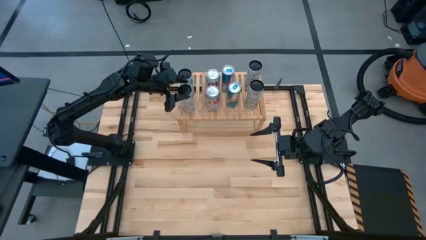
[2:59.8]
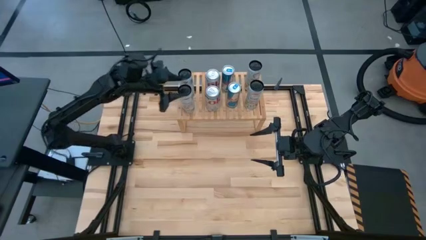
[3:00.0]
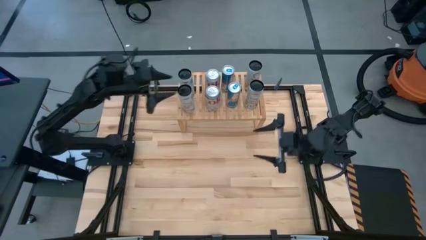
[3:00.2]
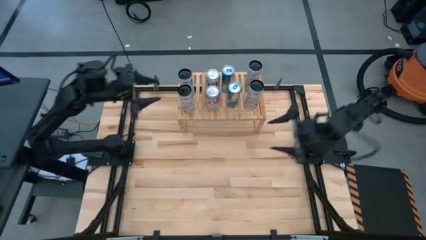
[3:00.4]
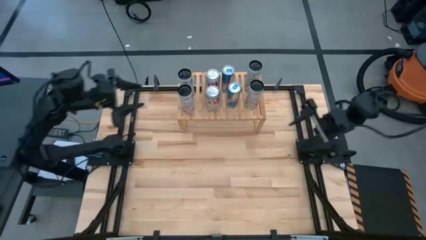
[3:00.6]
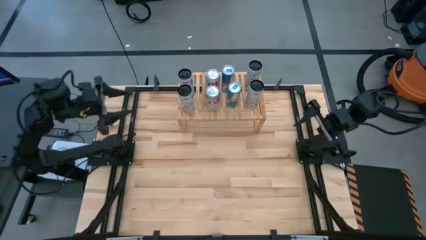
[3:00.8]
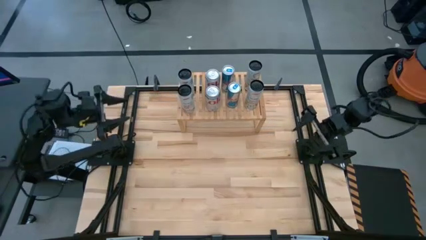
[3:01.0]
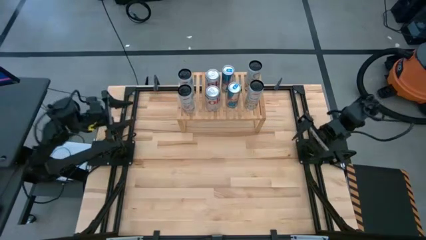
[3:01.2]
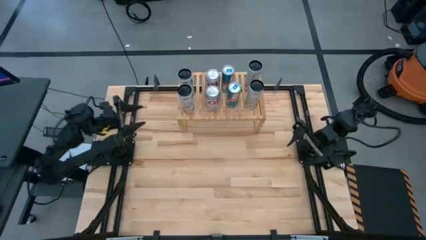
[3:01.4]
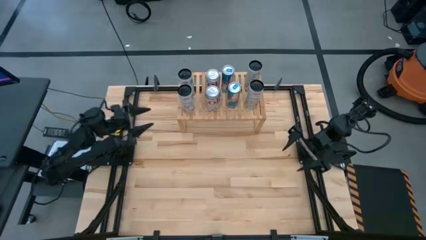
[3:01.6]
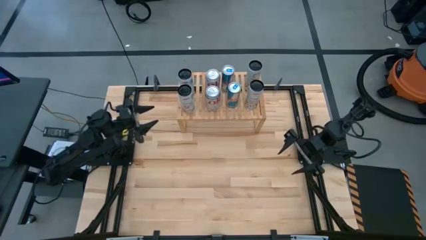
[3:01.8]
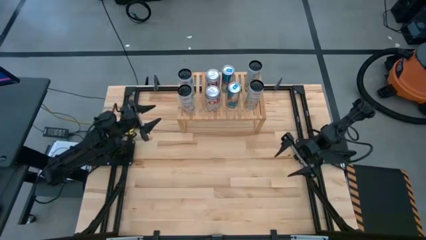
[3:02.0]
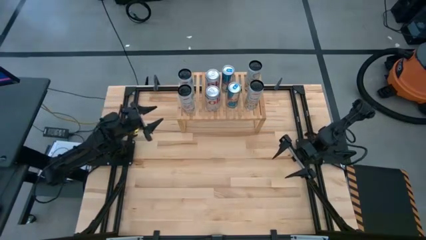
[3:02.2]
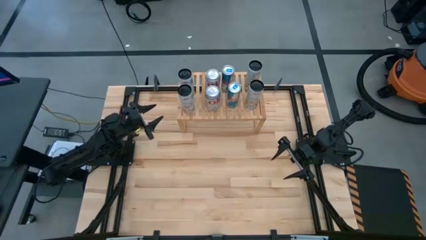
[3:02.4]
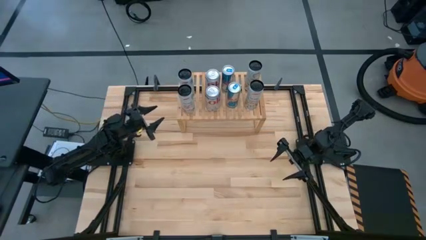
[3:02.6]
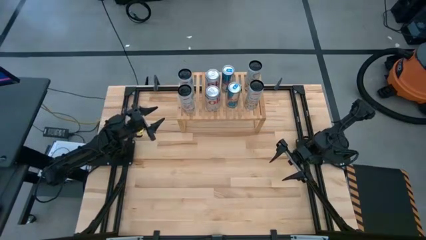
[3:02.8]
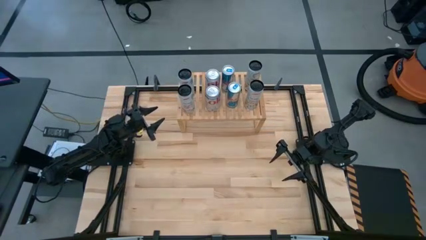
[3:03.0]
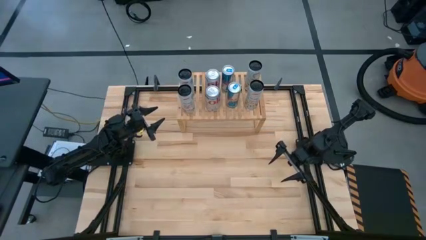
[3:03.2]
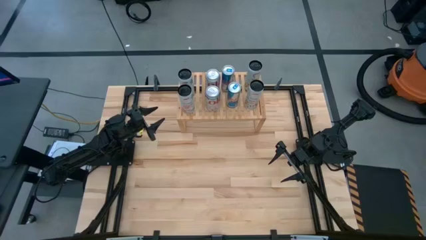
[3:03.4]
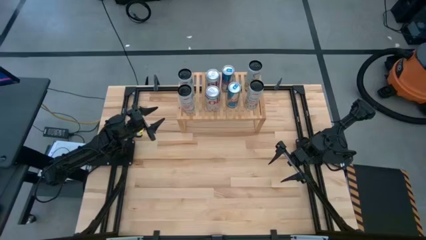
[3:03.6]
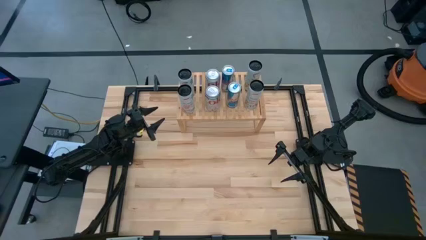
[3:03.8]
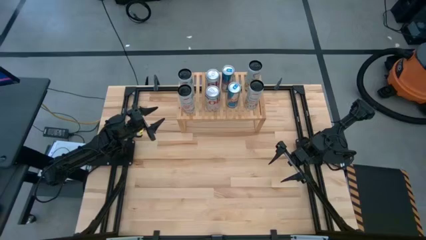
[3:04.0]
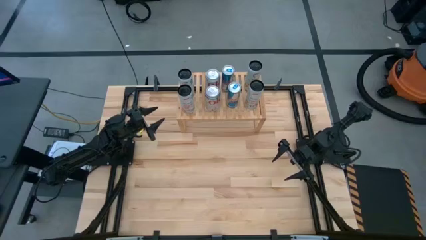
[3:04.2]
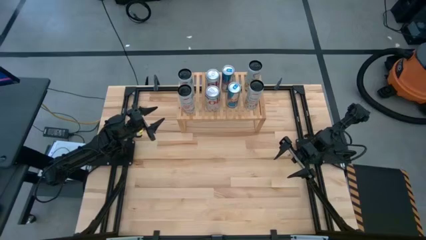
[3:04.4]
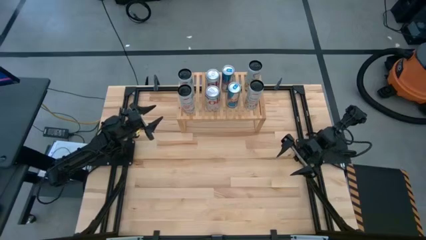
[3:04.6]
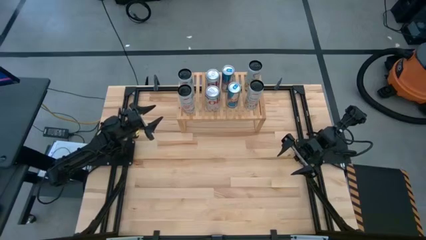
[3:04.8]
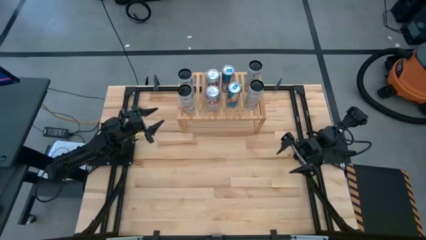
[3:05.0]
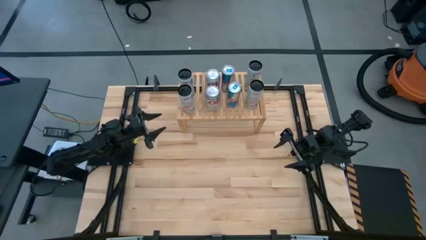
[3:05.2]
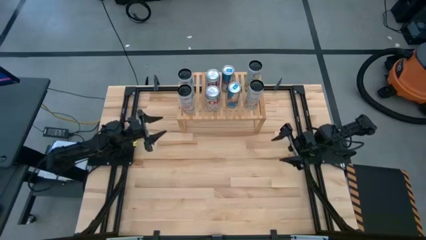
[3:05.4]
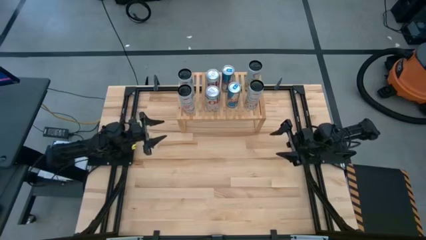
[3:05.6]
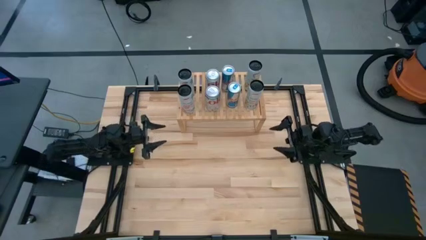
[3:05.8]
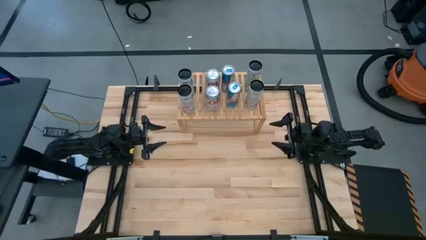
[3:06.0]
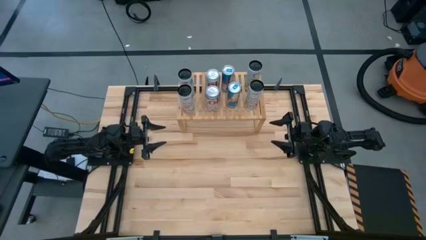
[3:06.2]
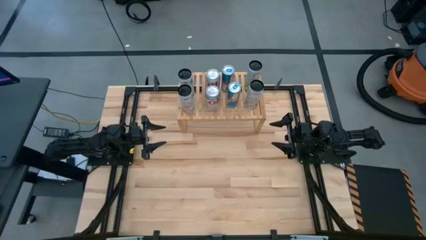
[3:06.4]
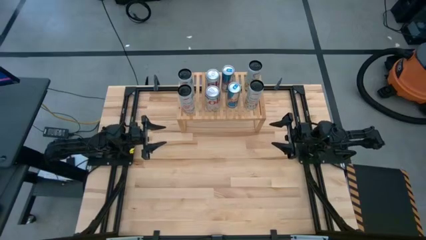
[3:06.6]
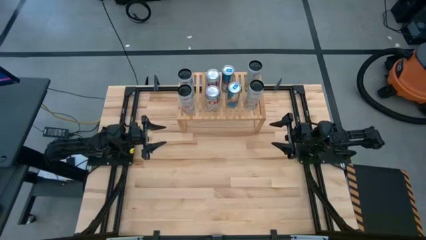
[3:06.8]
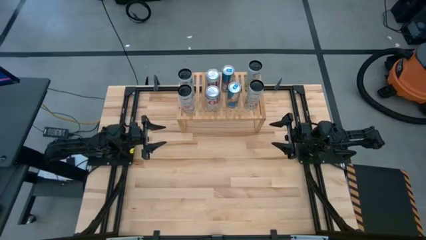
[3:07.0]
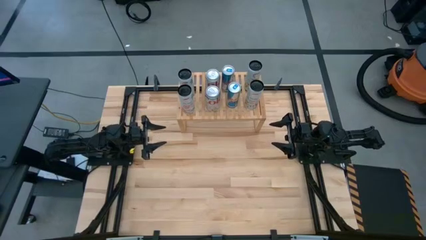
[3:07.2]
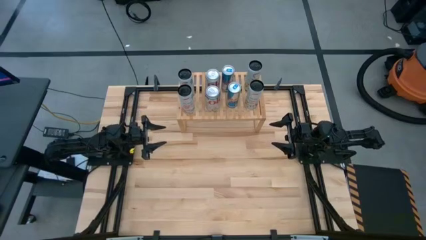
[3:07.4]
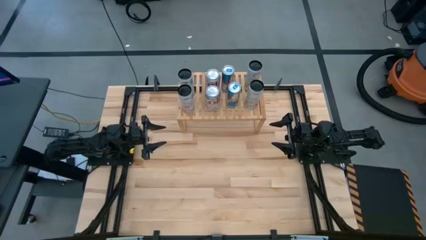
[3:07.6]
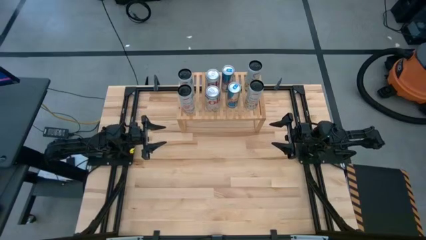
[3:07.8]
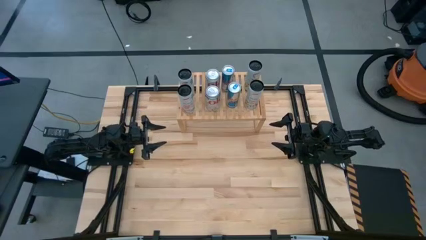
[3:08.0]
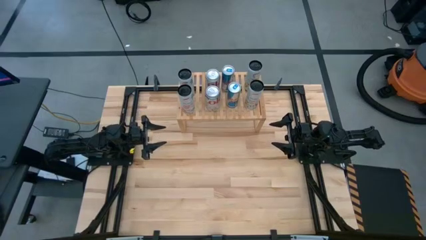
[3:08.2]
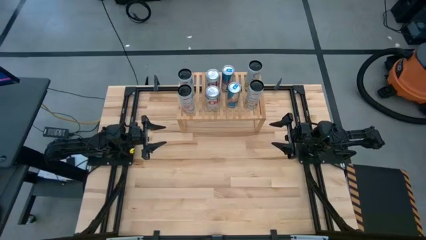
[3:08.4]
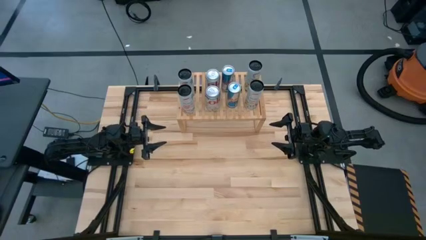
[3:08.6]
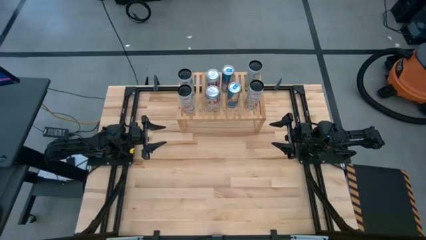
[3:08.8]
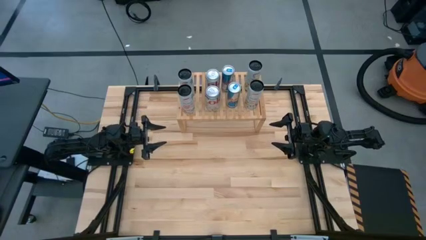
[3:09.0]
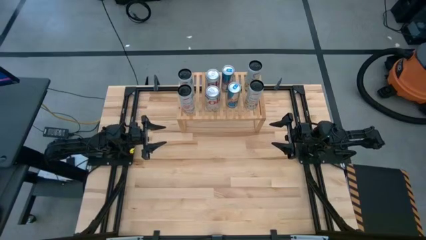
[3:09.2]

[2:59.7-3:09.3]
Task: Place canned beverage on shelf
Return to Home Position

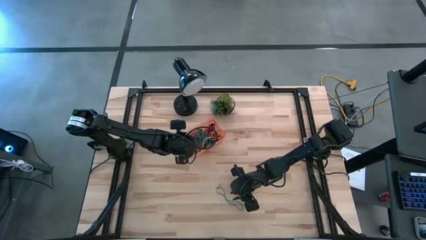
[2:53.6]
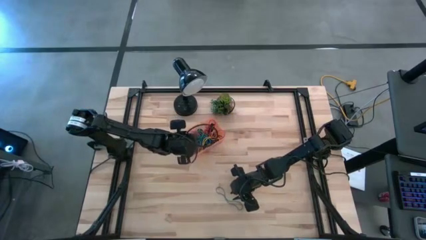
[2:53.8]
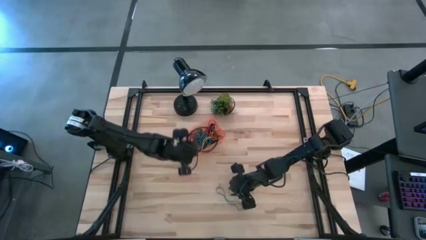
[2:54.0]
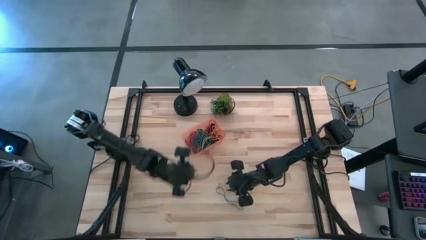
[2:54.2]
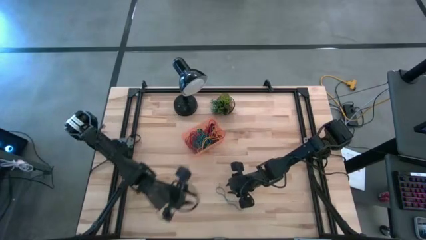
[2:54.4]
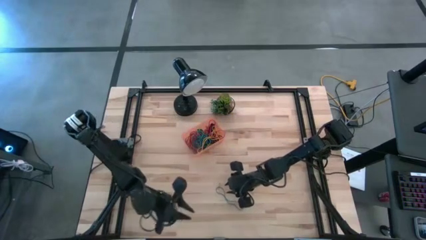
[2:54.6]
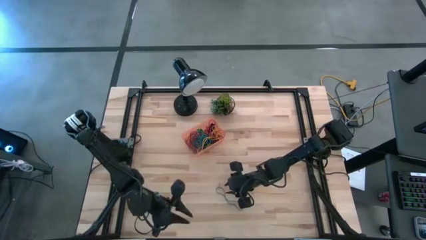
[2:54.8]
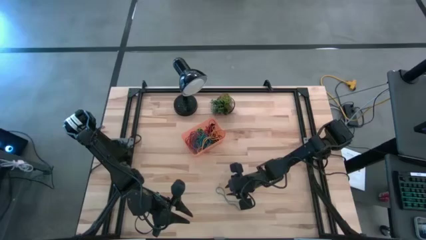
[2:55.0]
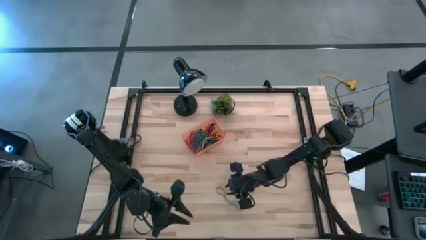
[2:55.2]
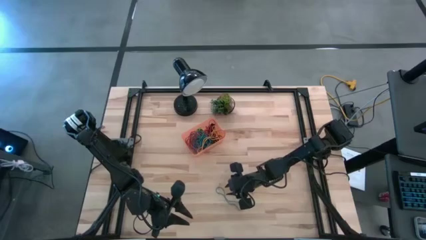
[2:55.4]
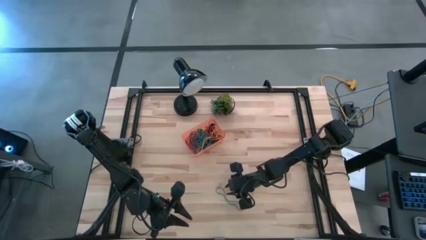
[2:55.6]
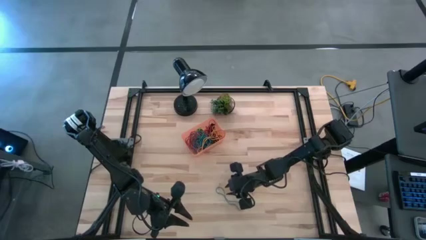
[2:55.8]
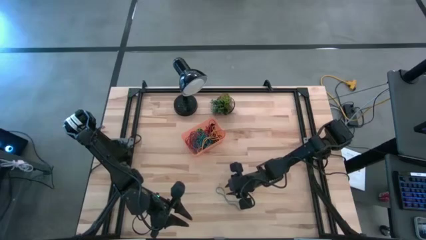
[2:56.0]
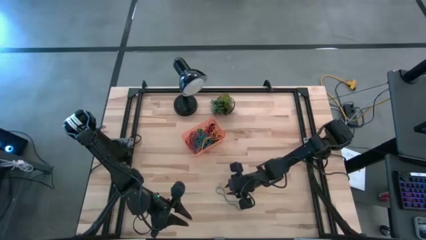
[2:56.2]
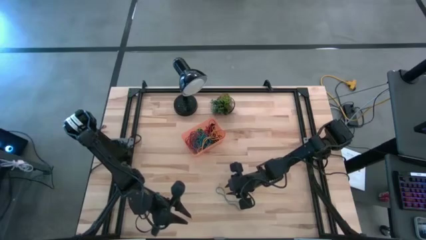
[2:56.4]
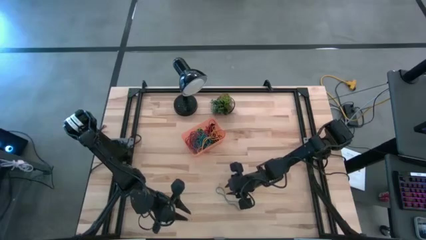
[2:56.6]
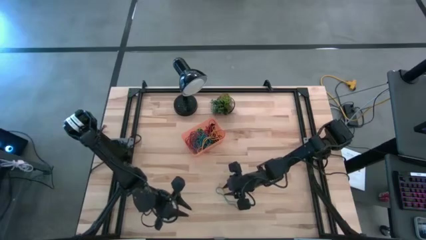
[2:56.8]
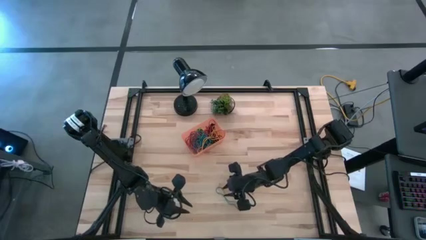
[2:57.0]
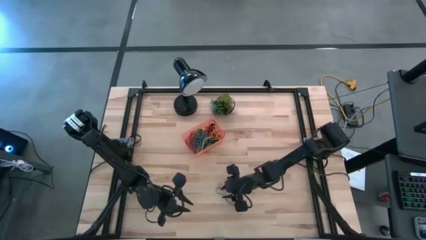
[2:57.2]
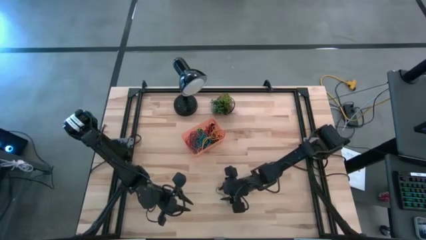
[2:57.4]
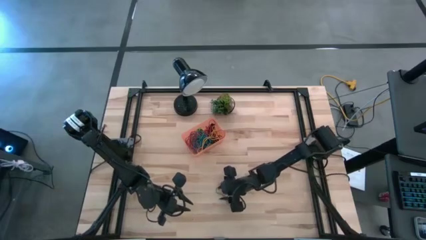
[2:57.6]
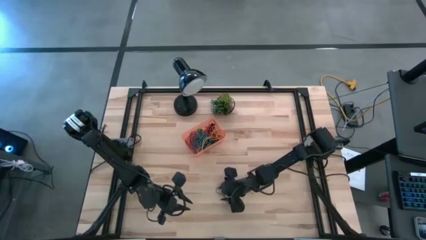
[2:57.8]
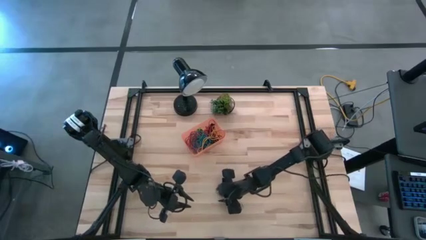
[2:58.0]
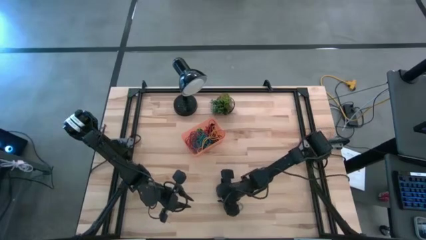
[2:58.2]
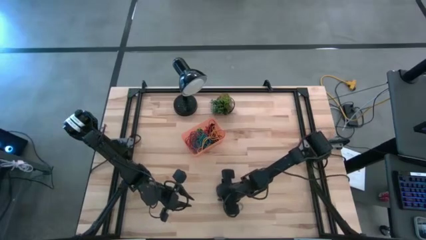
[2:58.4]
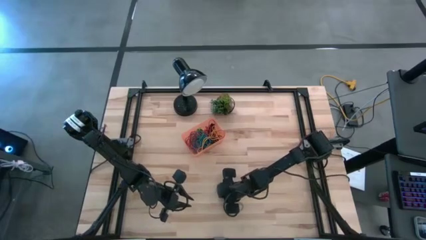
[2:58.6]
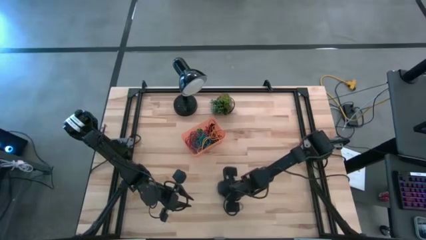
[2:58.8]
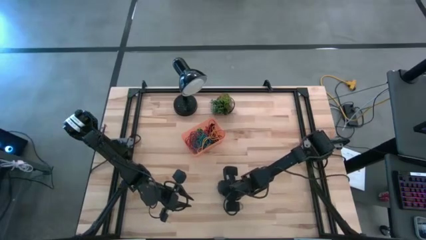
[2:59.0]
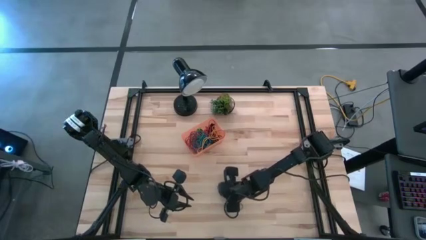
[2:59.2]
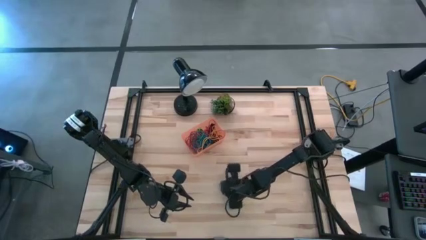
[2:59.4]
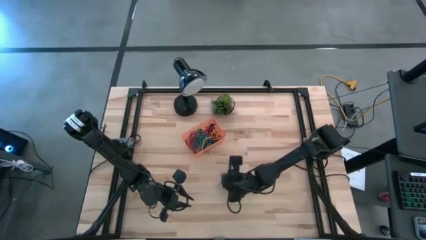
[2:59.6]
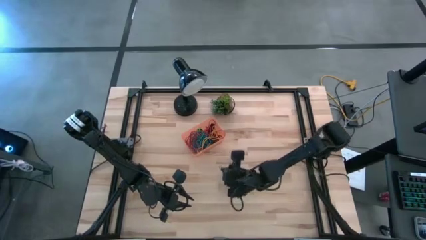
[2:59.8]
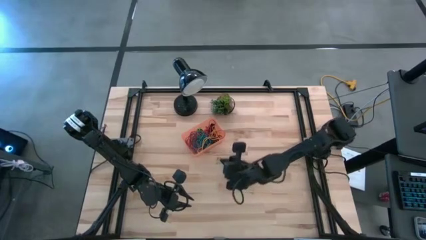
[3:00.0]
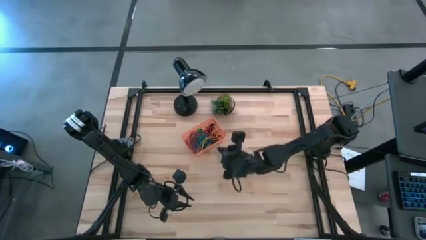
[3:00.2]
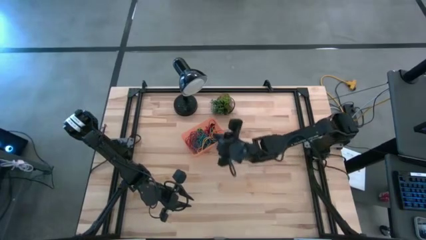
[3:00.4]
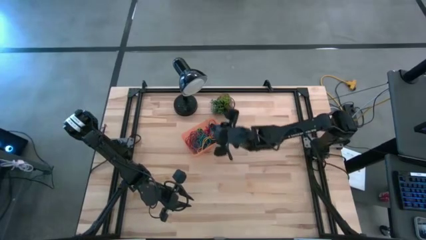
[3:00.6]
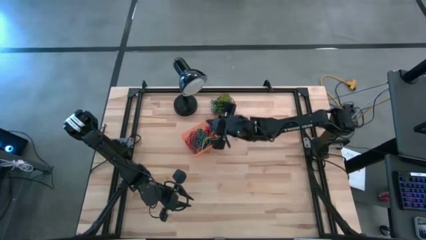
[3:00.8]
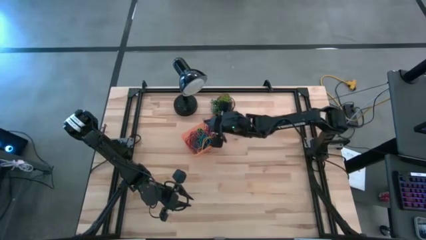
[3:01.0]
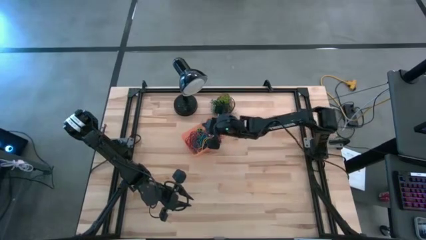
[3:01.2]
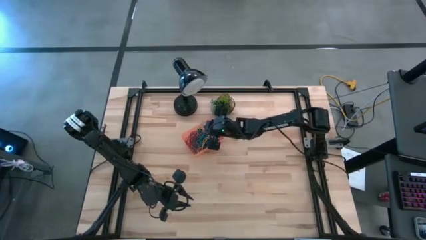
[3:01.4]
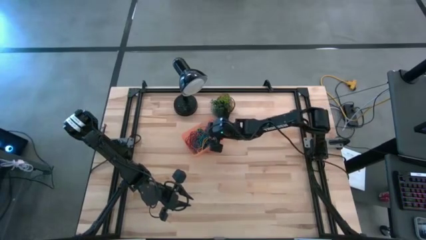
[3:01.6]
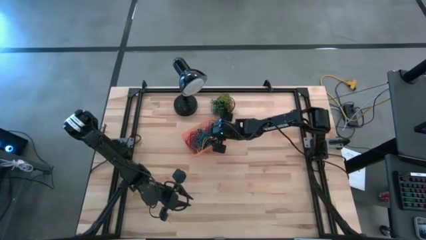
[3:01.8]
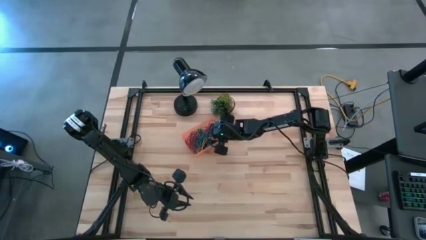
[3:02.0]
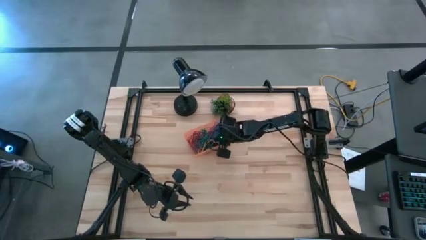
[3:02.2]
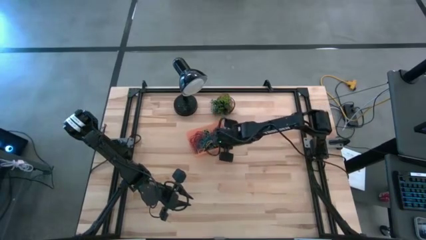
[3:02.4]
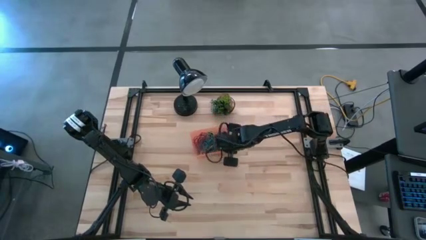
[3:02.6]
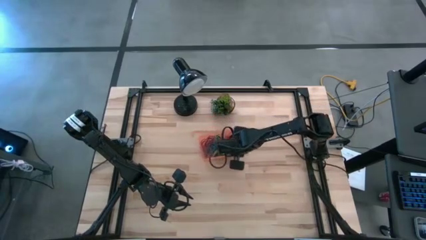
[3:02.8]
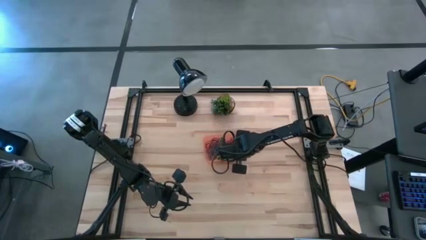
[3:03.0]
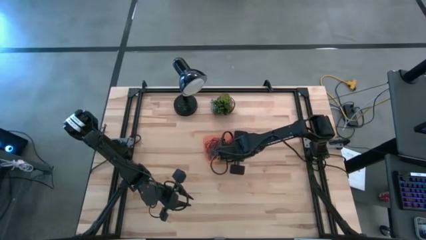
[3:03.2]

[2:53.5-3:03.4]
Task: Pick and place rubber bands into bin
Put the blue rubberband into the orange bin
